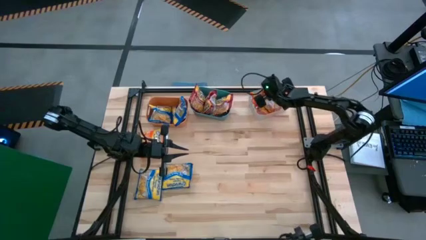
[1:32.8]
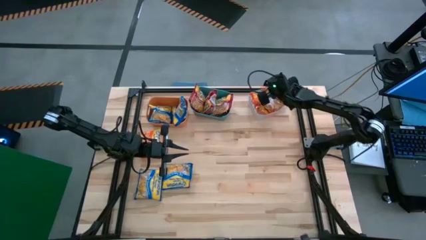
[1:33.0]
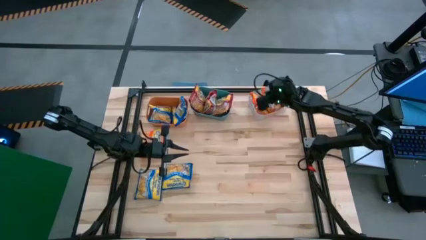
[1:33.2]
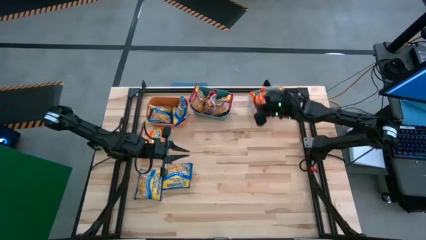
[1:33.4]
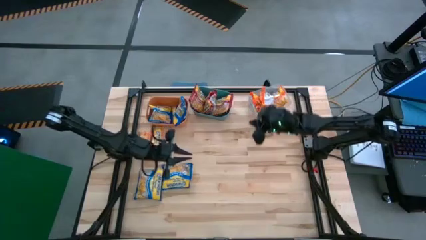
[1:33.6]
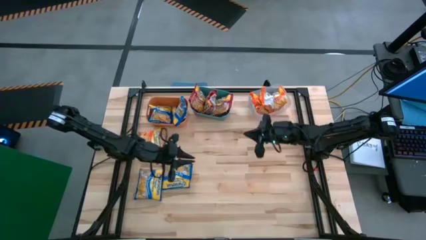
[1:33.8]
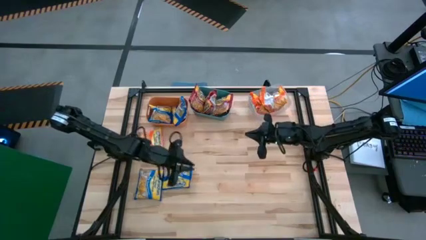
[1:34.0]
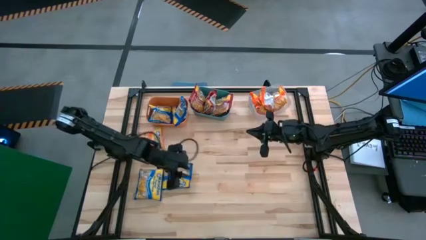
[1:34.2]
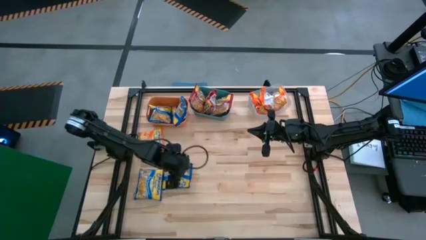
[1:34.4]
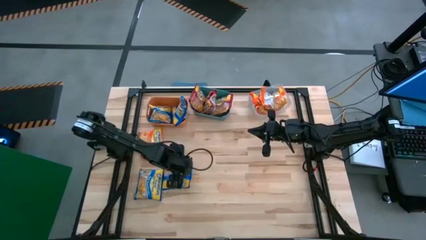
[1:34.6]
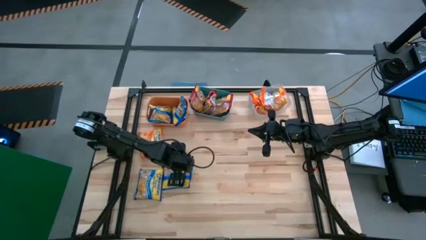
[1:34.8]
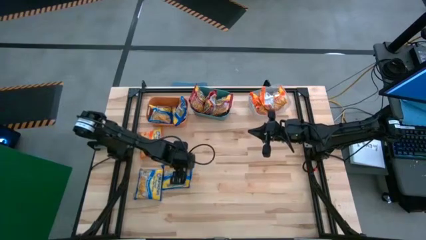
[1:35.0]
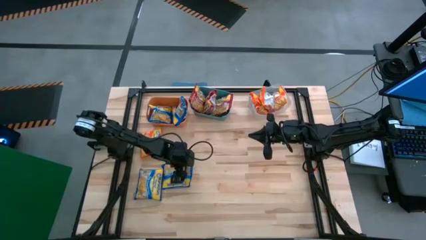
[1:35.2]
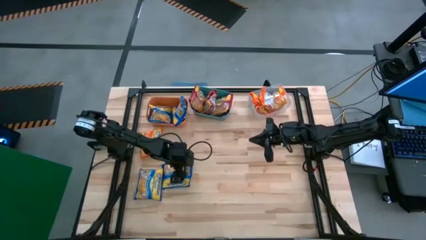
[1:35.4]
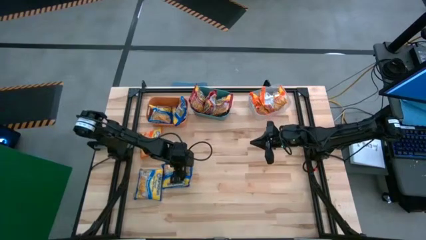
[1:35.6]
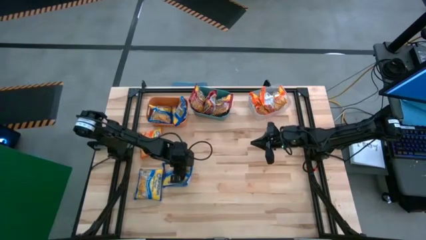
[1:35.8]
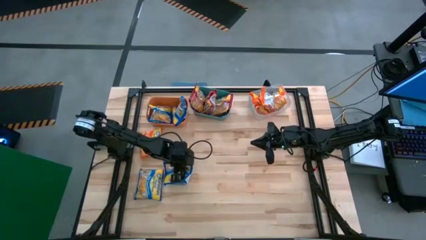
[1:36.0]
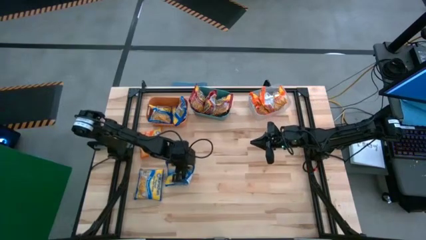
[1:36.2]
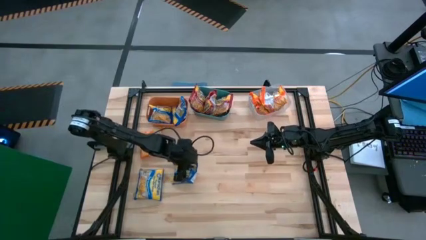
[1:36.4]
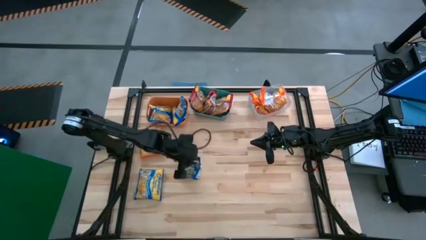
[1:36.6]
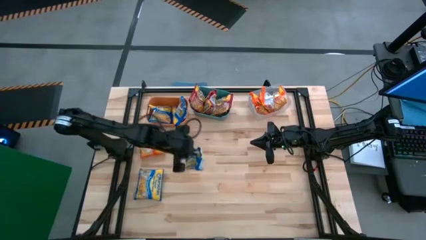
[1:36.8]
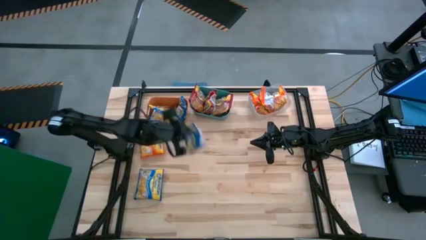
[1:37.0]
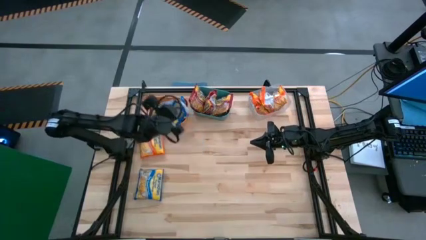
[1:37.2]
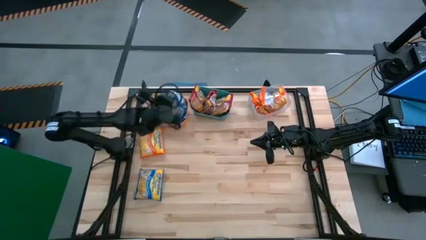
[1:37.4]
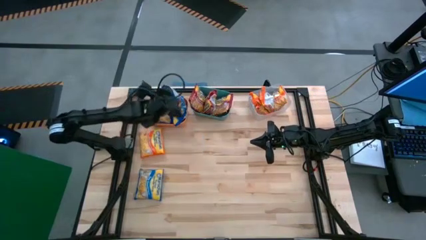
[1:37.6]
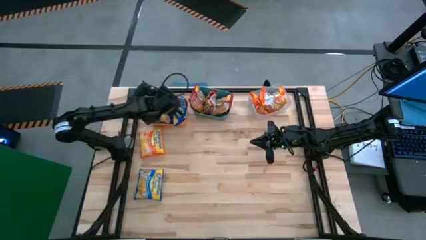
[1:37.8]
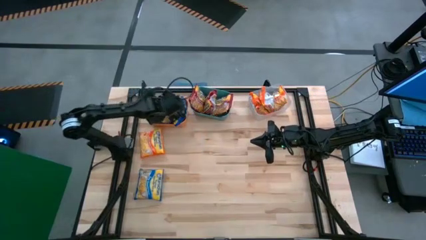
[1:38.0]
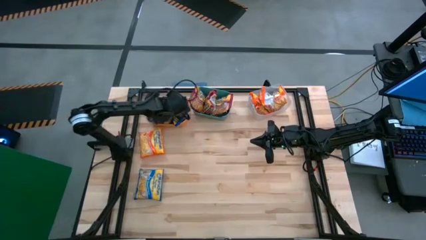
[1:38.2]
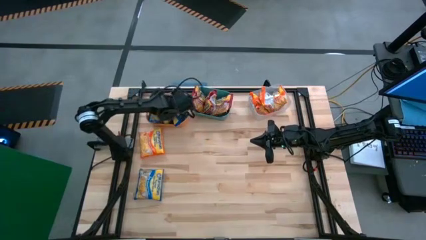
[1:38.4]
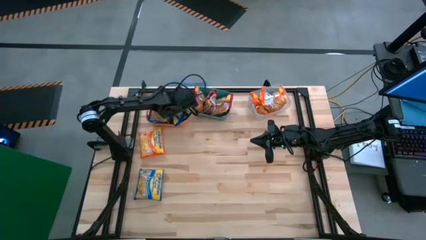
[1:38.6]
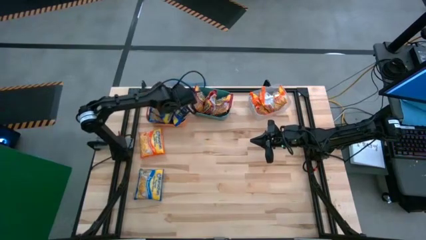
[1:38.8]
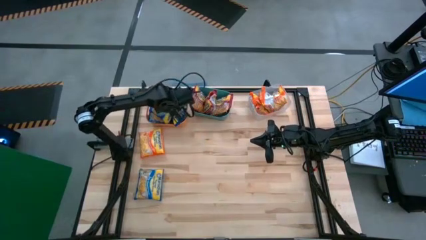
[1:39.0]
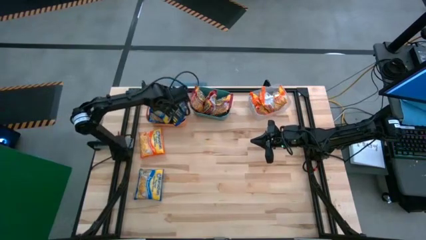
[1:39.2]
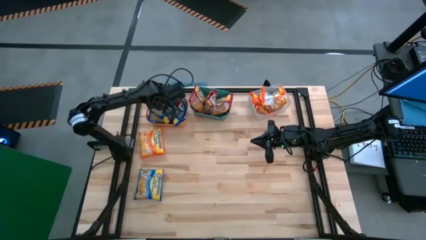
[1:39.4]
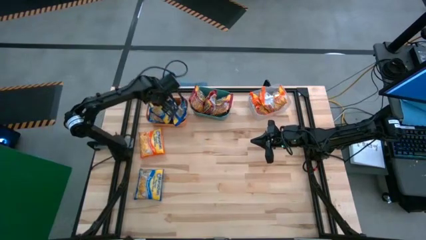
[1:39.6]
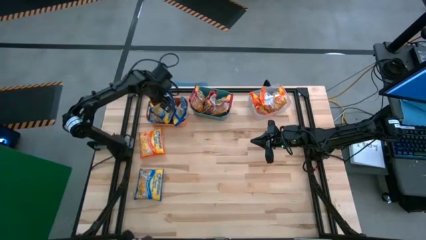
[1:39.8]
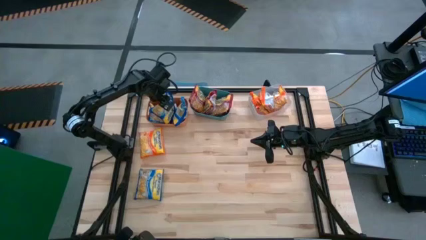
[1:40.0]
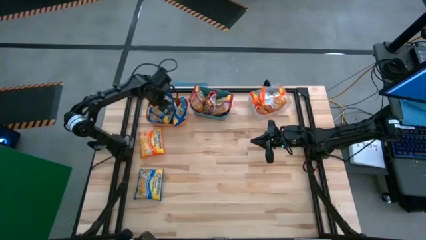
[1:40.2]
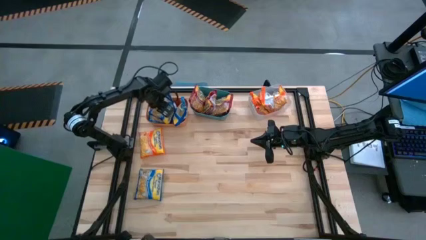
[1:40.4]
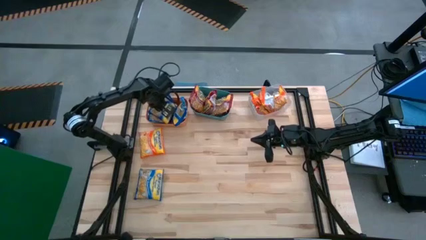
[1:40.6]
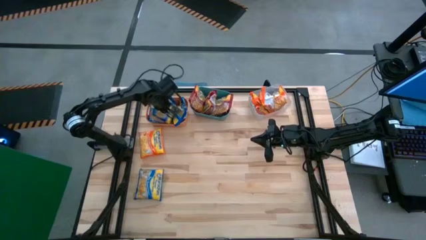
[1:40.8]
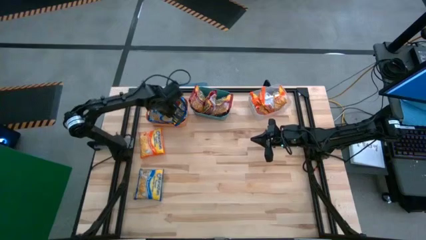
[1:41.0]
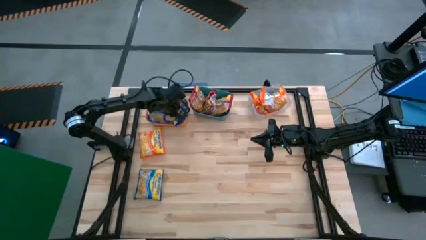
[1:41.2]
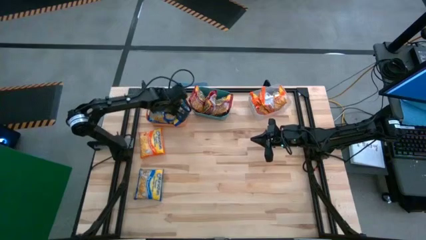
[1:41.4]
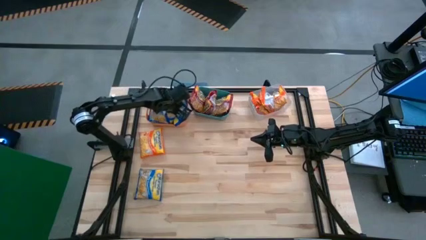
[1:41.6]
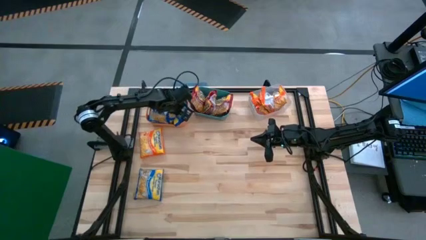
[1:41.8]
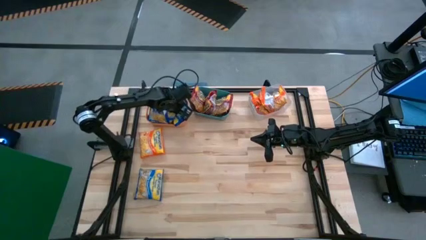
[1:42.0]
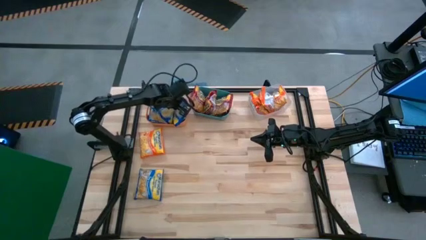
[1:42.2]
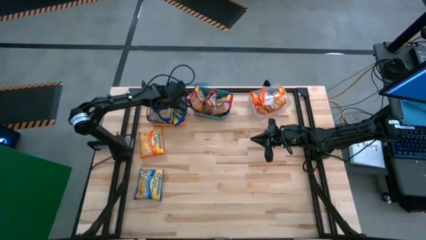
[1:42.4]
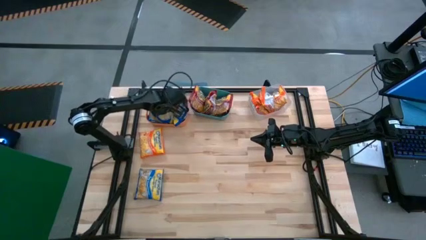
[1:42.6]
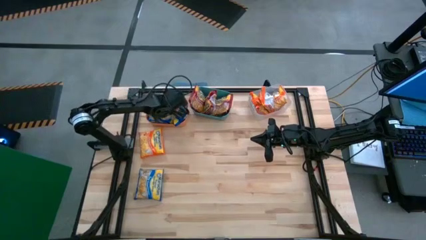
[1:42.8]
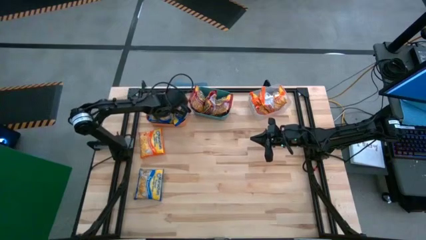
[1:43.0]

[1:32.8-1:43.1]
Task: Sort Maruchan noodles
Put the blue noodle pack into the orange bin

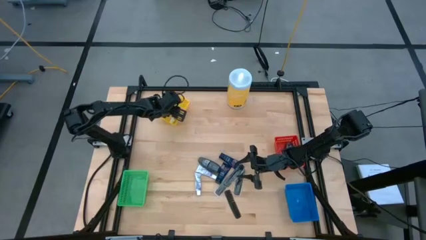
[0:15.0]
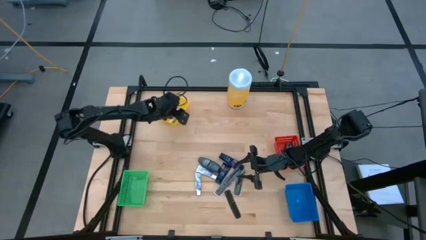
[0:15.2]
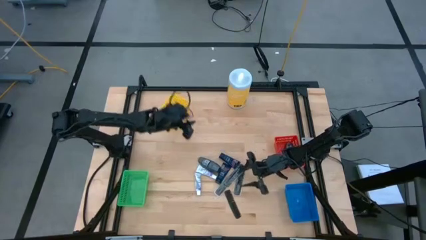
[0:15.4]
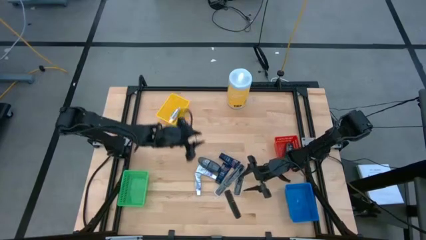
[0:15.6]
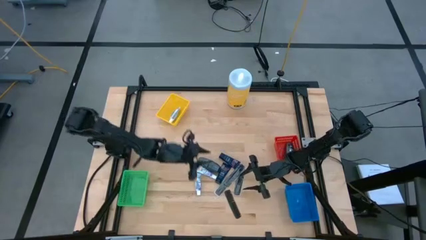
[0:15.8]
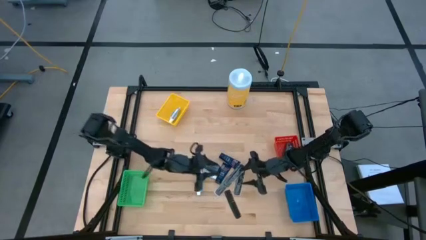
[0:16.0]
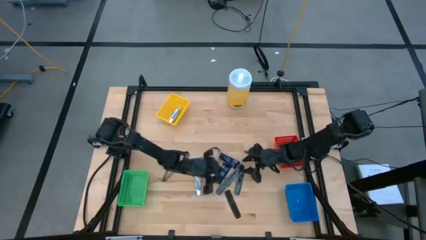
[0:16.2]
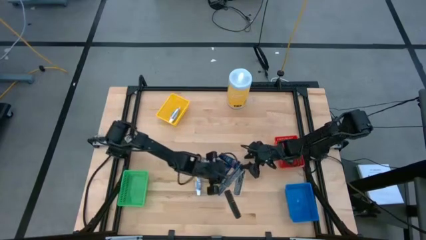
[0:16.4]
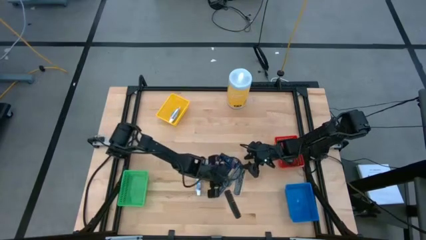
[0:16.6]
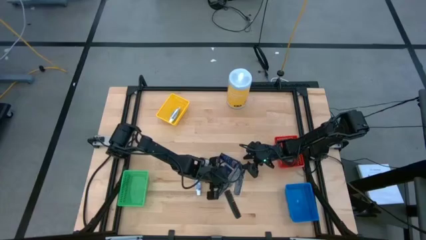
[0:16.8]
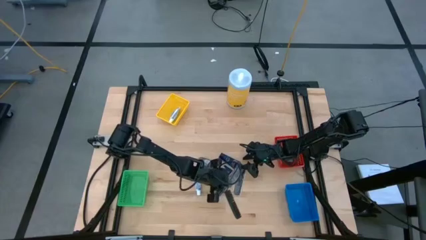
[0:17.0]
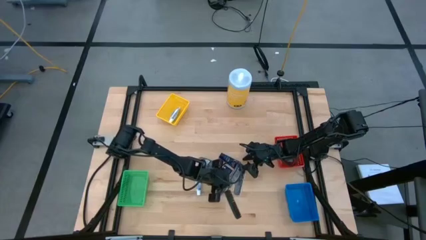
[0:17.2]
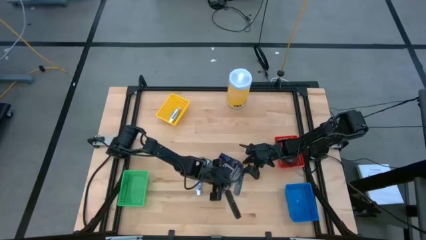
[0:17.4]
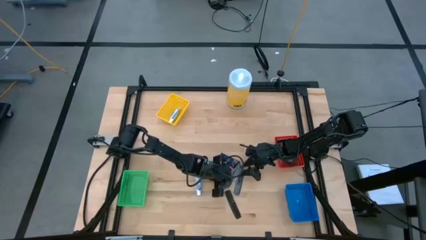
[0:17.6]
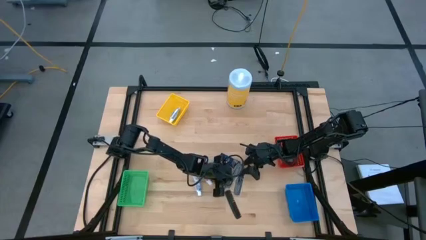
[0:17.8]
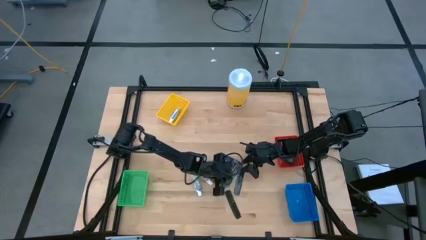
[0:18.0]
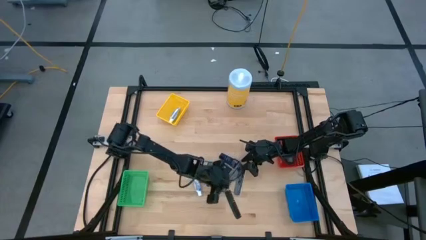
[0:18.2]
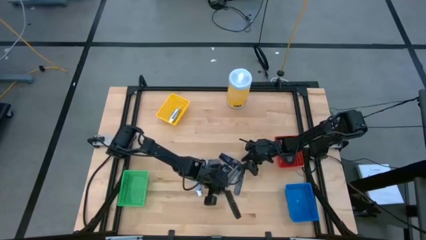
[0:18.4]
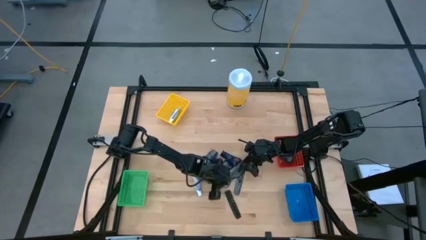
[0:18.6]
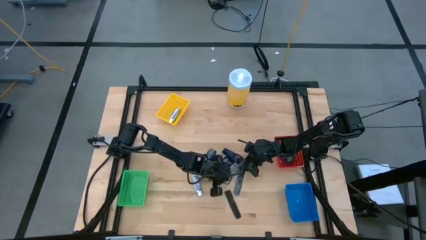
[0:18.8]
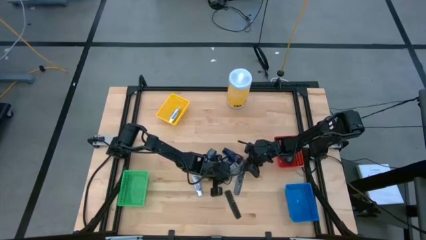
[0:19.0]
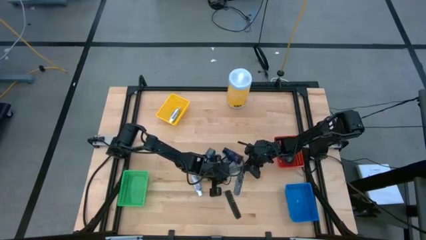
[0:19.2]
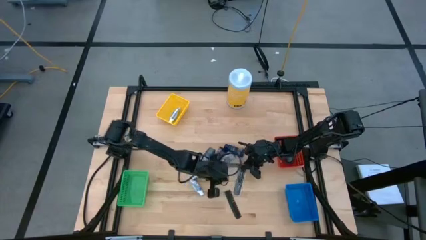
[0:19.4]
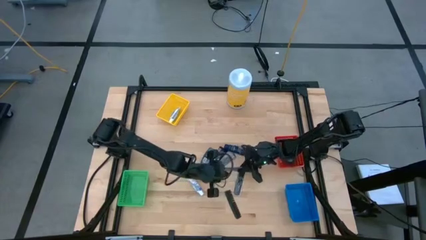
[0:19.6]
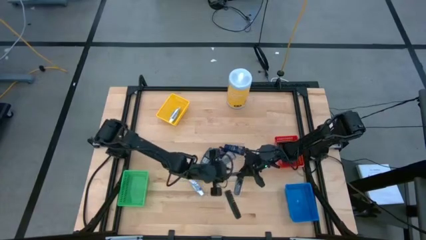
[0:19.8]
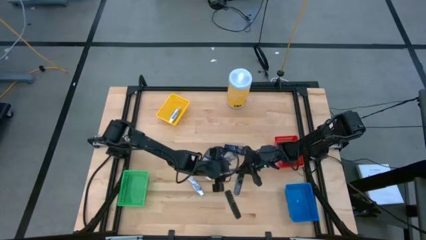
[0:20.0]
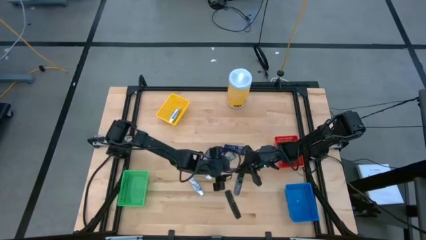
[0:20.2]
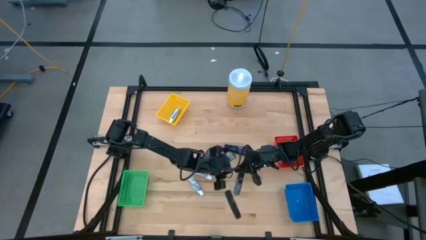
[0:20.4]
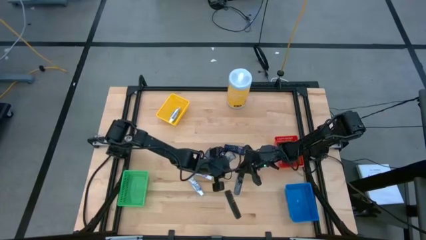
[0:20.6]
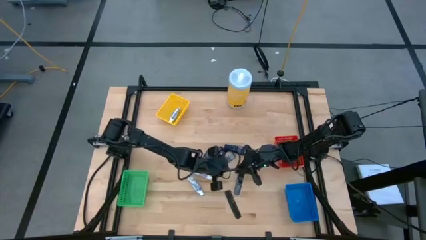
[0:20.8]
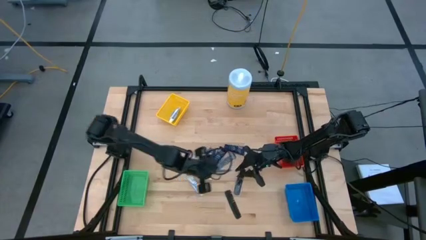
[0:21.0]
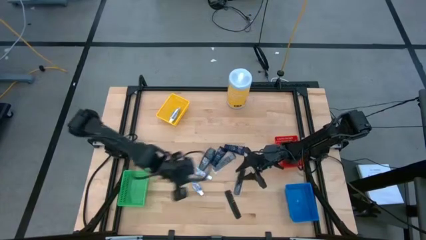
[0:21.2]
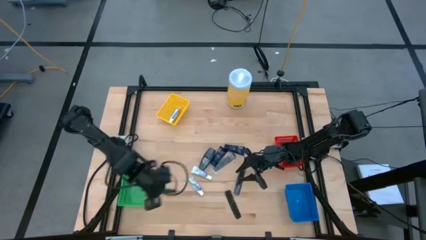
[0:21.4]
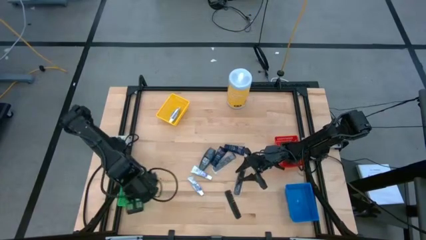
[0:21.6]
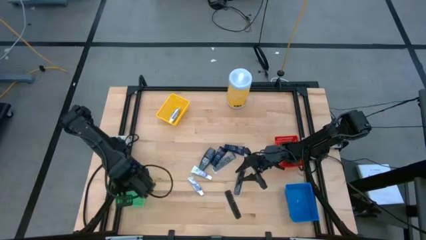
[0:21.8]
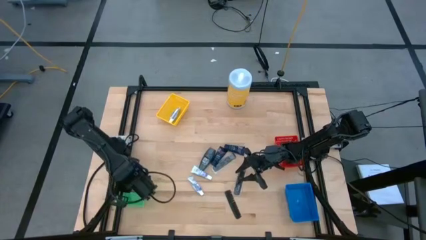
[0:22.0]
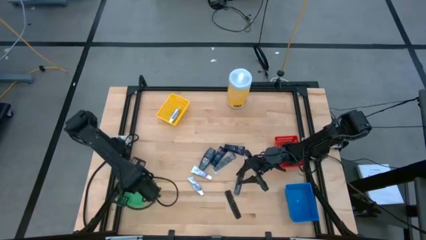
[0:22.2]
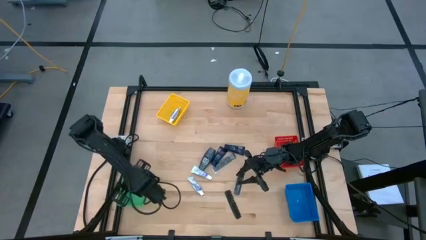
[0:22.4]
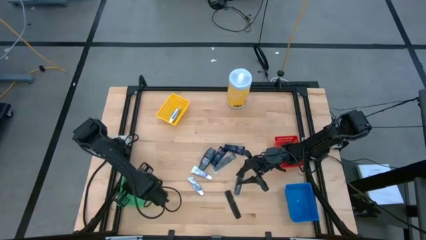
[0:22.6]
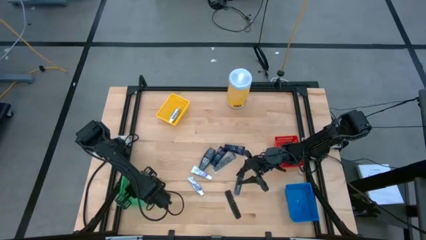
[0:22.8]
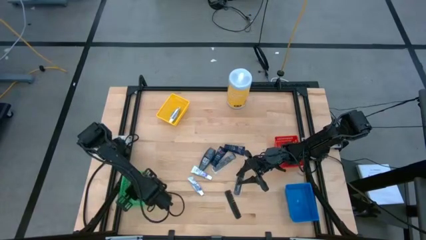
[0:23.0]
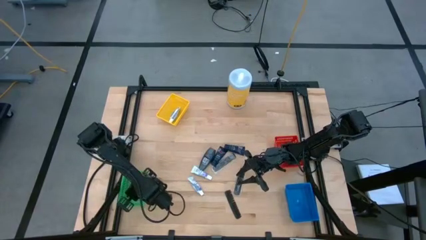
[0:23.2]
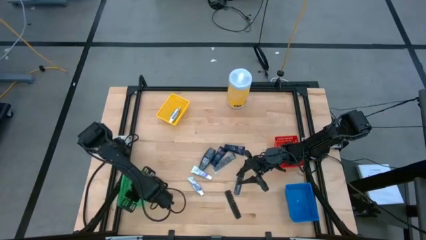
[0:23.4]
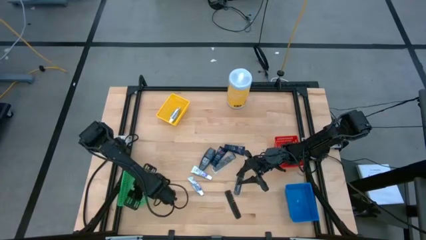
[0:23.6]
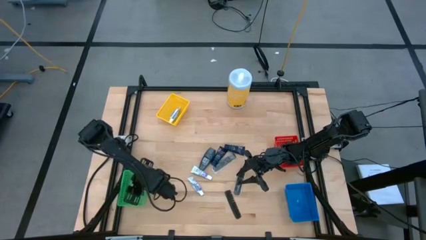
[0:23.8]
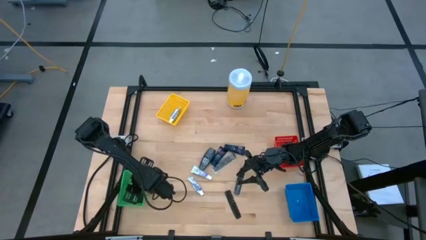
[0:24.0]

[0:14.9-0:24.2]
Task: Pick & Place Travel size toiletries
Put the black comb into the green bin
